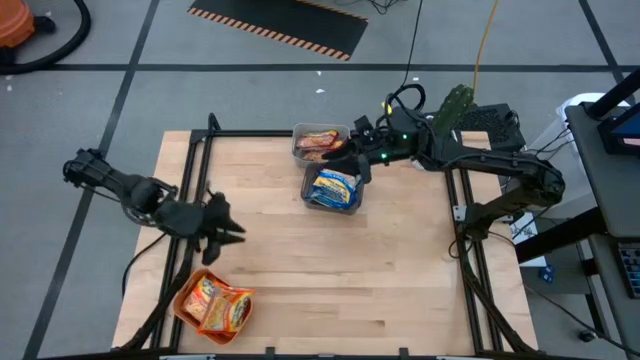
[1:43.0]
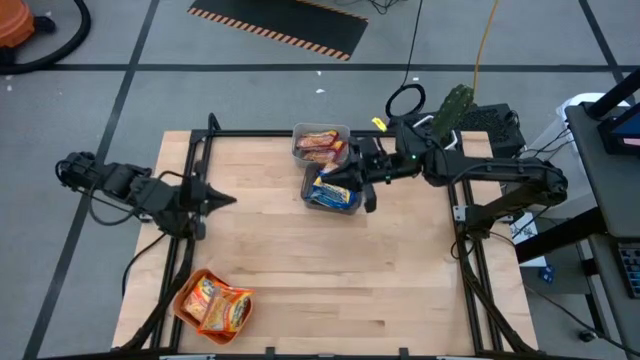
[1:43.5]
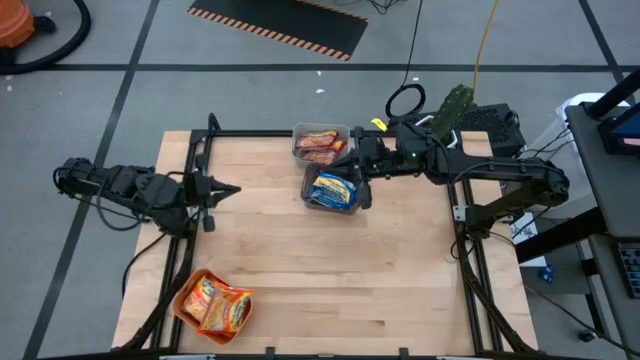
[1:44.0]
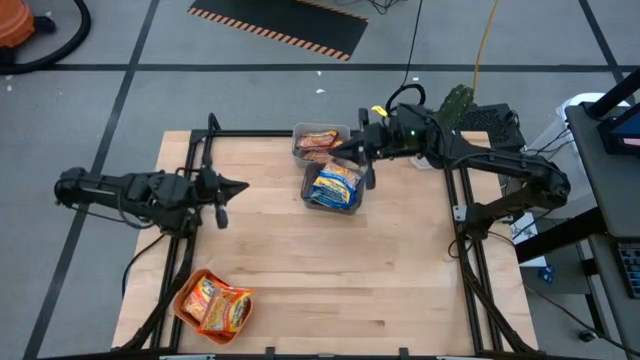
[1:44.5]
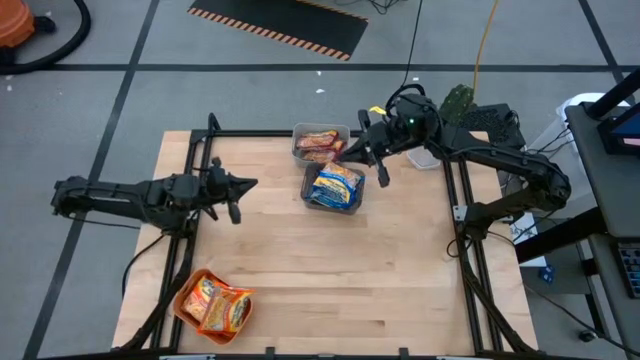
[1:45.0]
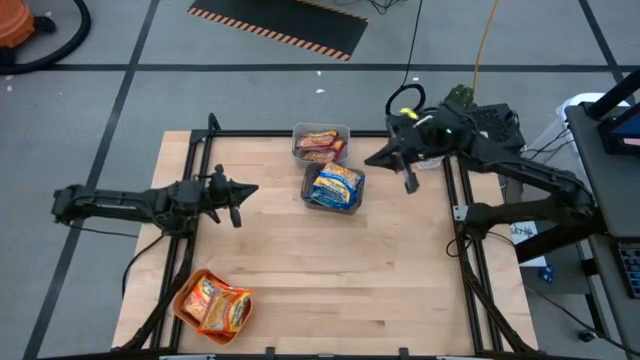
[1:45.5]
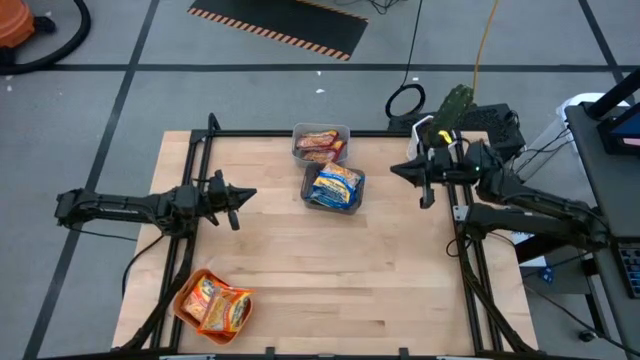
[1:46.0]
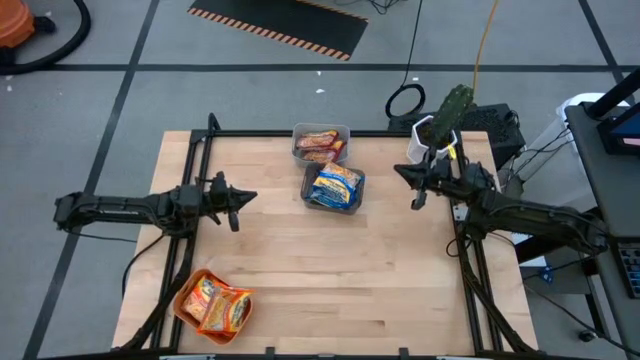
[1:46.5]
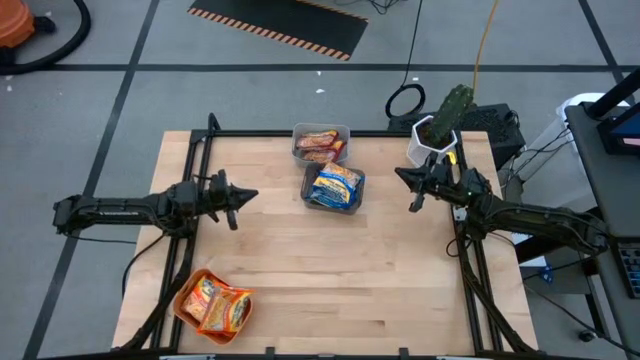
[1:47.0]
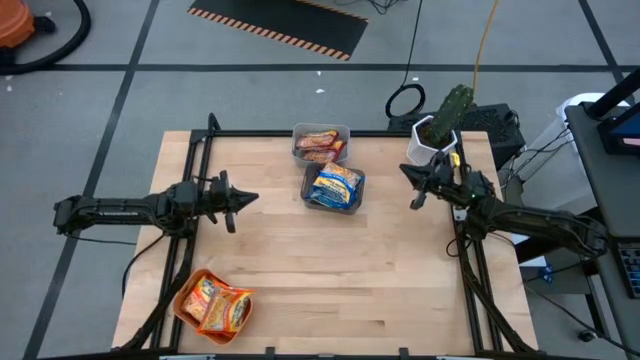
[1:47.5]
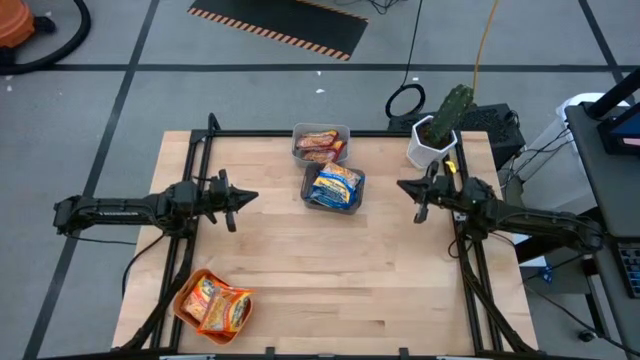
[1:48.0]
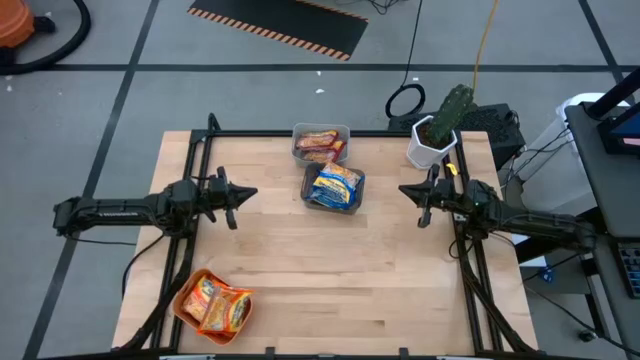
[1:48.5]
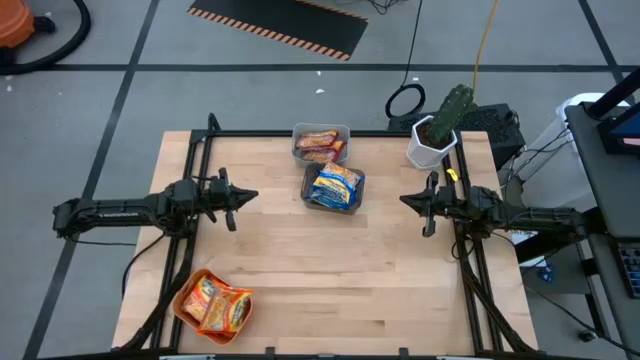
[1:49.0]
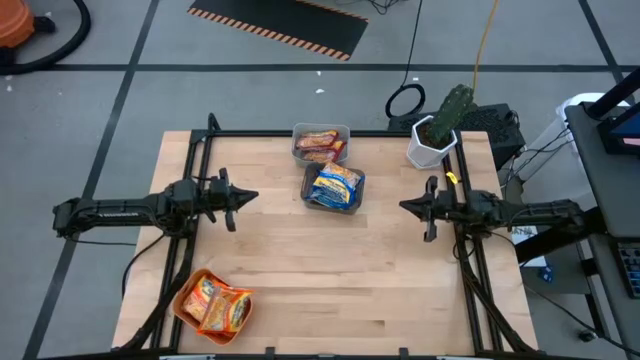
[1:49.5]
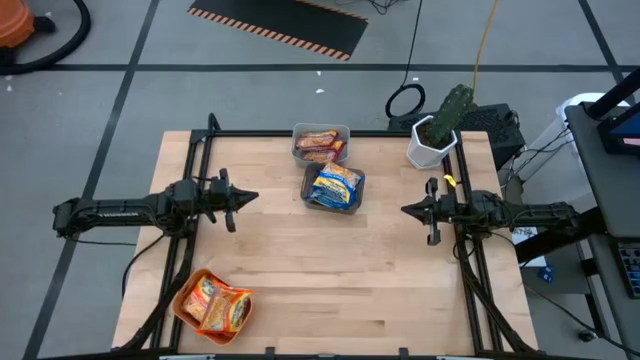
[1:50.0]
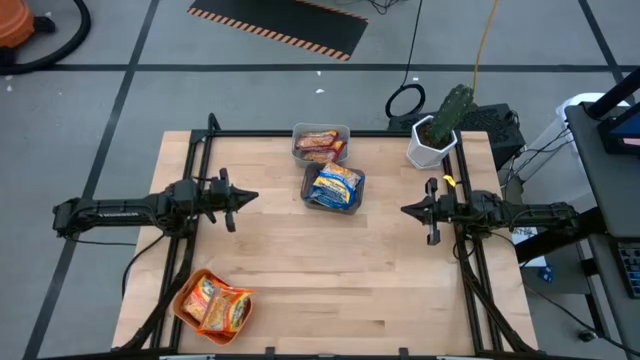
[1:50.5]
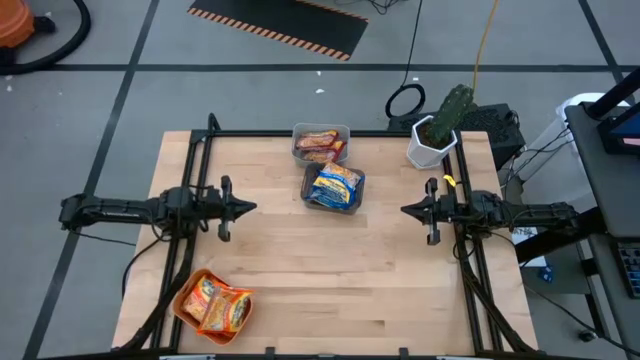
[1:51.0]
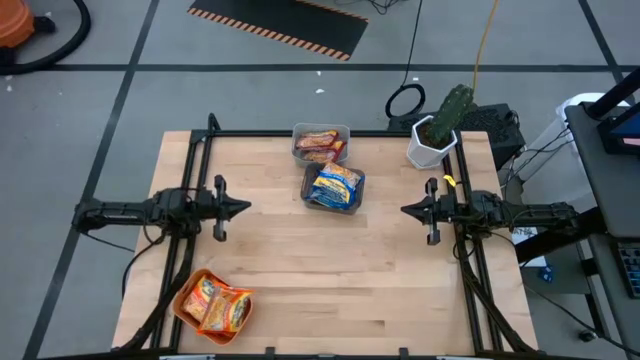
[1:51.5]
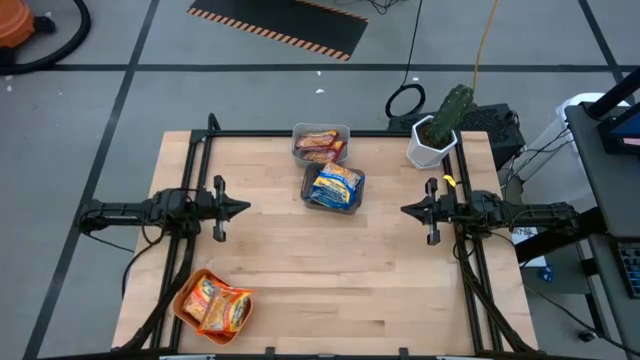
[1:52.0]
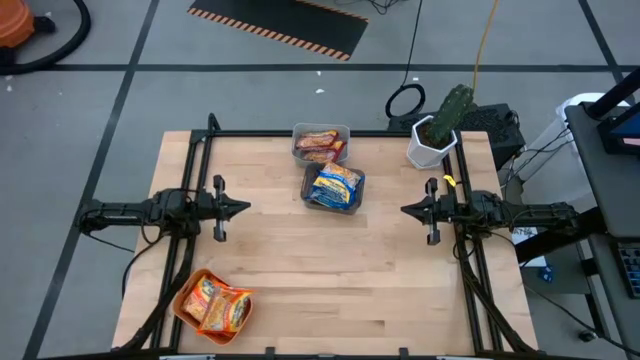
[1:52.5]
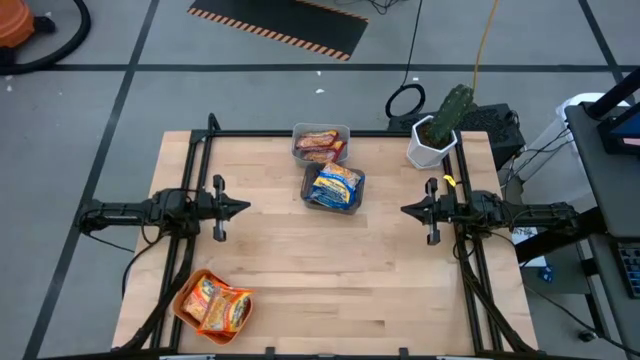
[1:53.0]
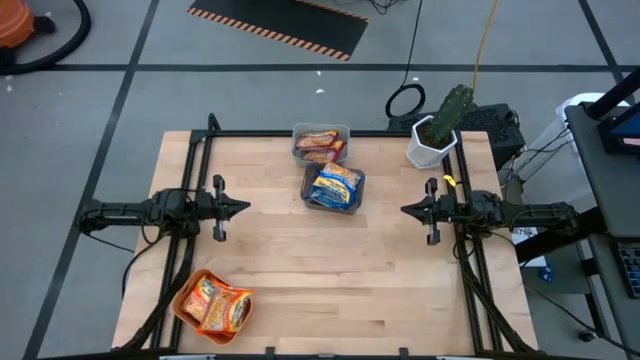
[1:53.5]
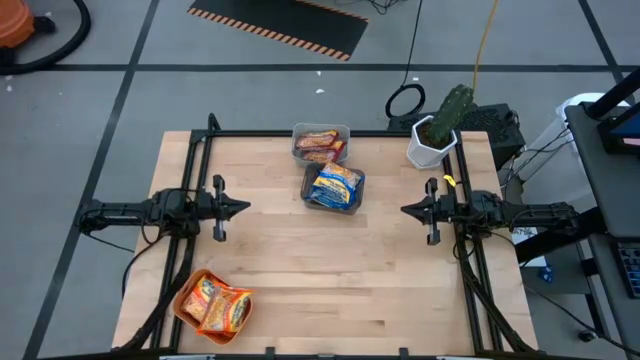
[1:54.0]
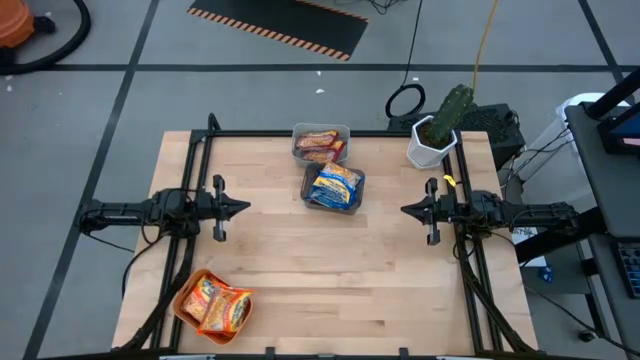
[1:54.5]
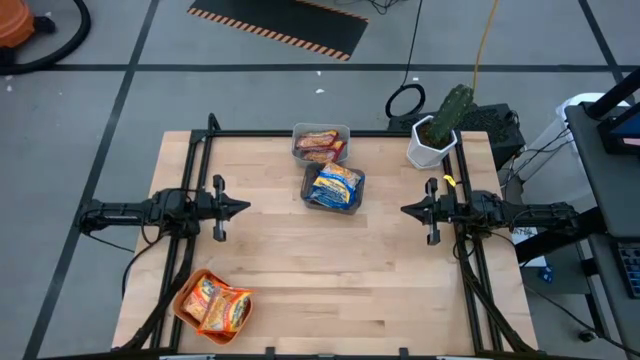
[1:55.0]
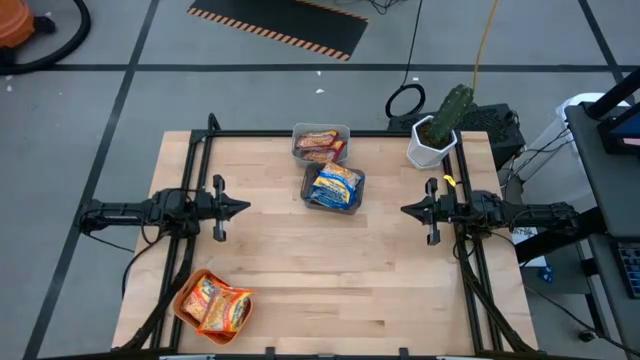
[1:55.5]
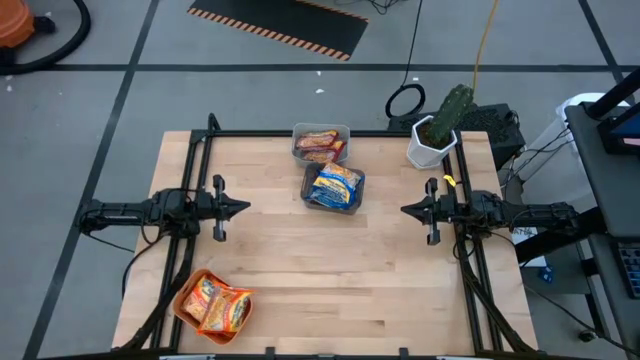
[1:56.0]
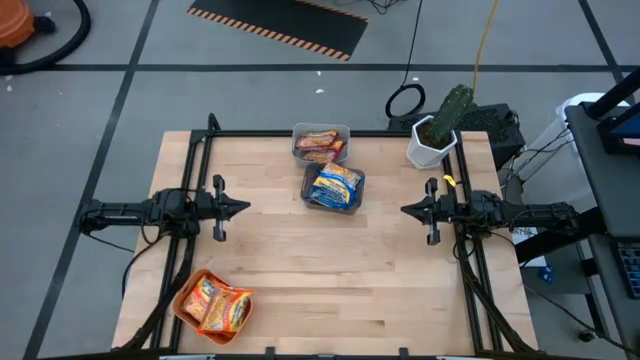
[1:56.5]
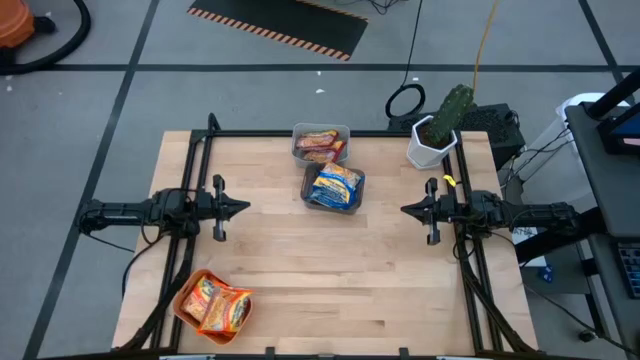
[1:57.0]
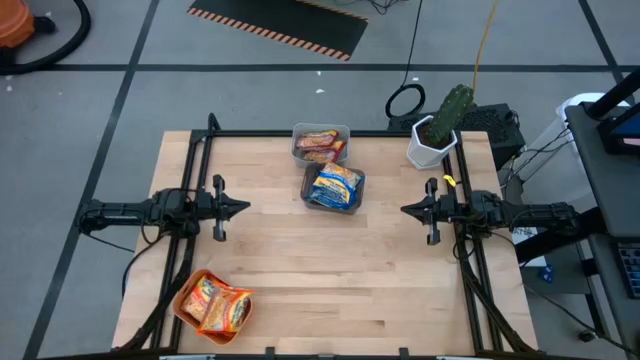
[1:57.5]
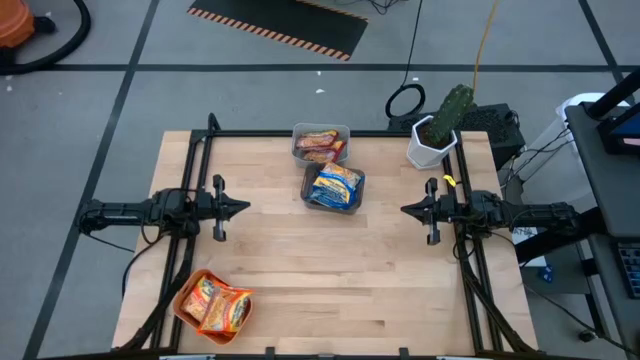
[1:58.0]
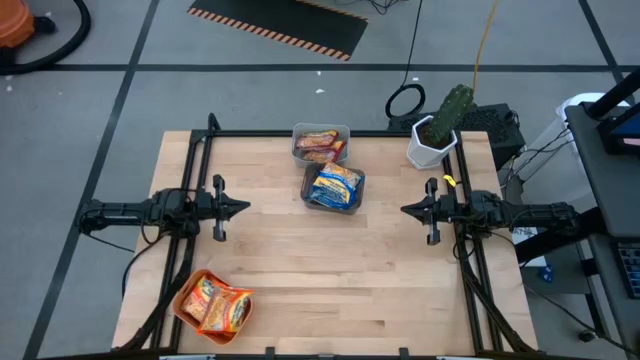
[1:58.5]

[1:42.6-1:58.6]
Task: Sort Maruchan noodles
Return to Home Position

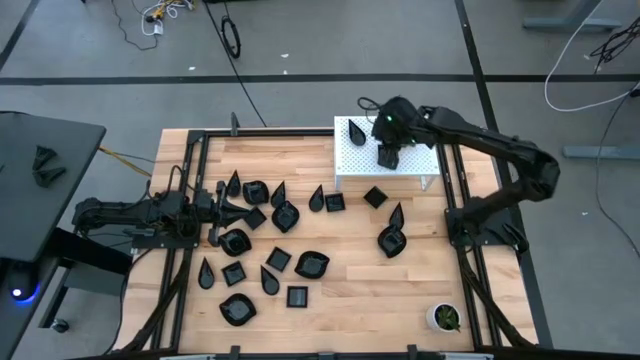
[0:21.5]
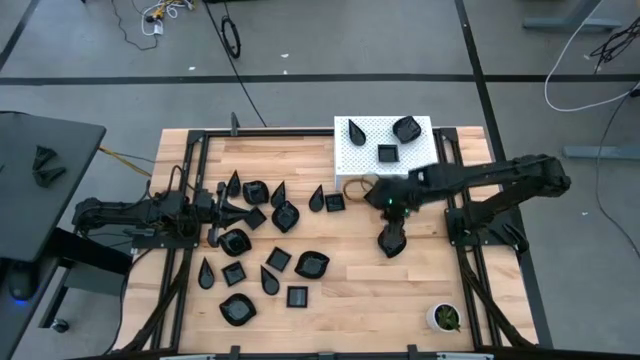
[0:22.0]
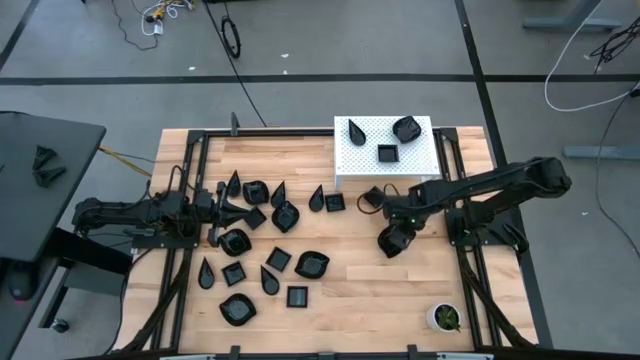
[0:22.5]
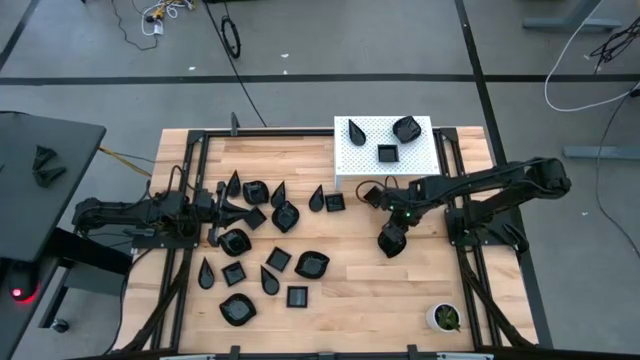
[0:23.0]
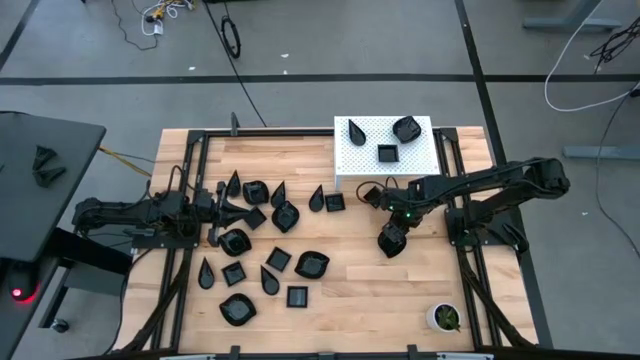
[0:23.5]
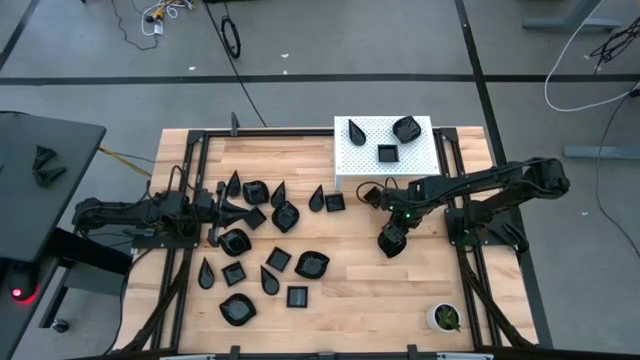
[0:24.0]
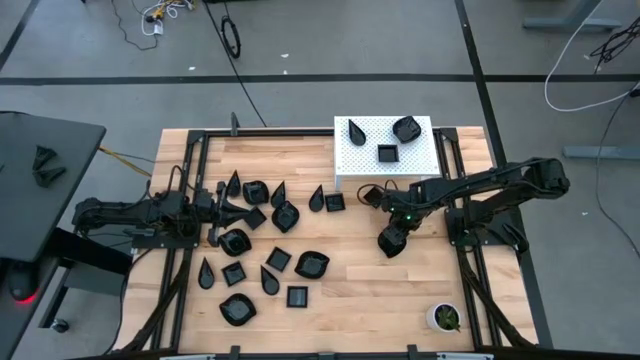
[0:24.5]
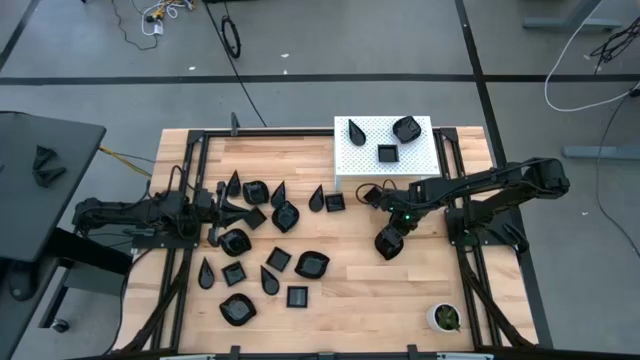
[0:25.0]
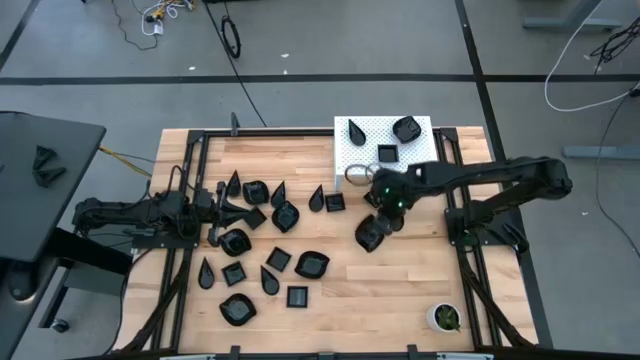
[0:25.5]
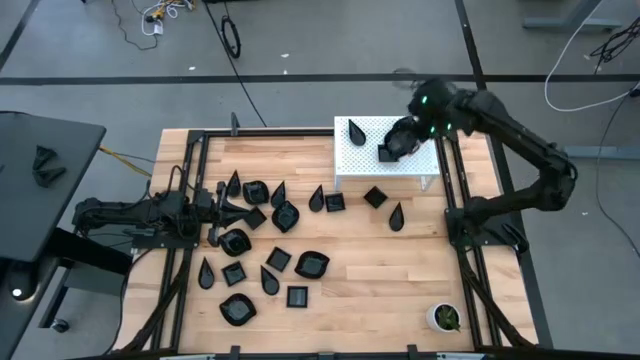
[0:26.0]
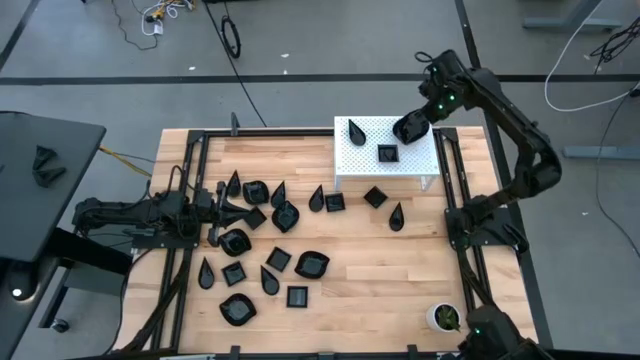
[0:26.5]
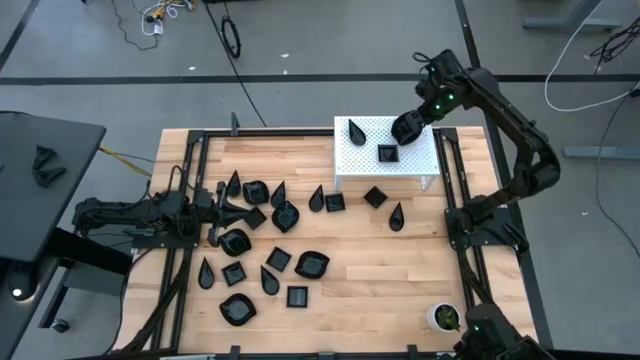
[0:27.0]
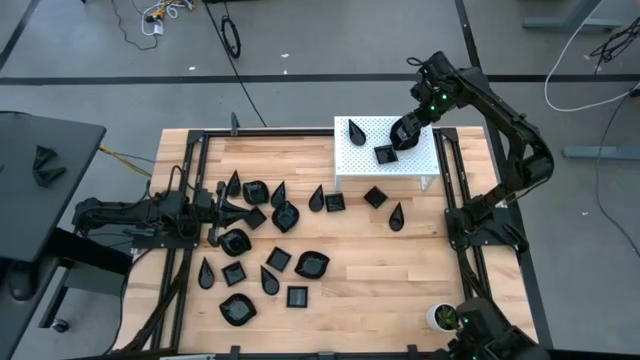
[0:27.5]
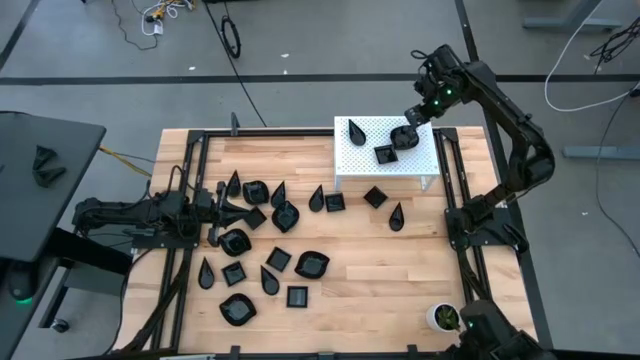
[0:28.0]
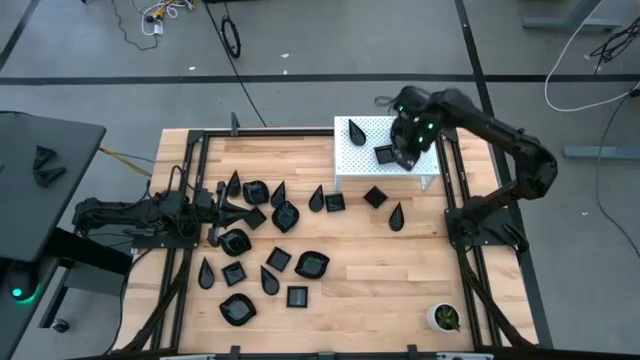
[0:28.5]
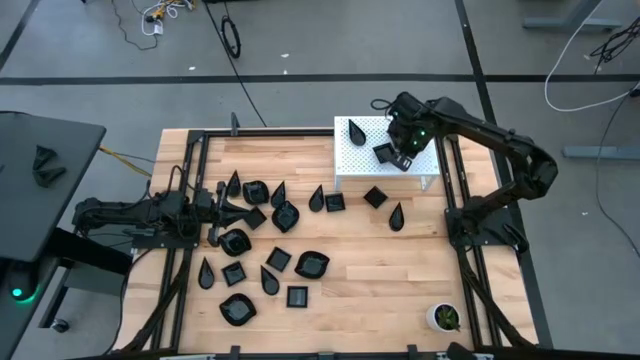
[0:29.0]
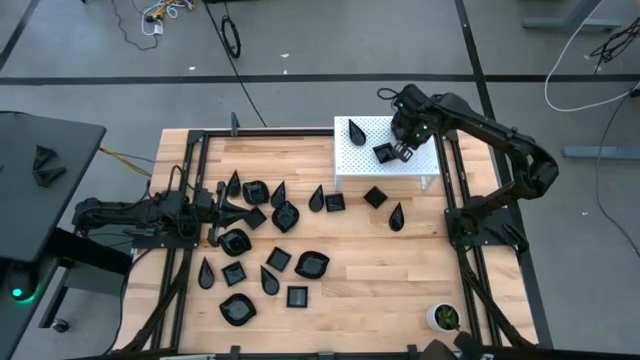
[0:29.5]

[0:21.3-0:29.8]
Task: Pick & Place Mini shaped plates
Stack the black leaf shaped plate on the black leaf shaped plate on the shelf
